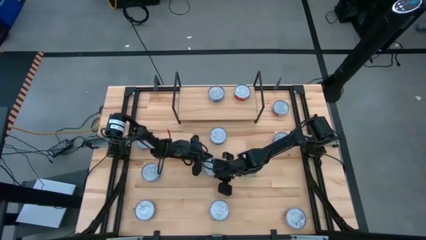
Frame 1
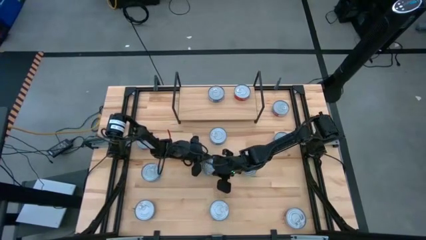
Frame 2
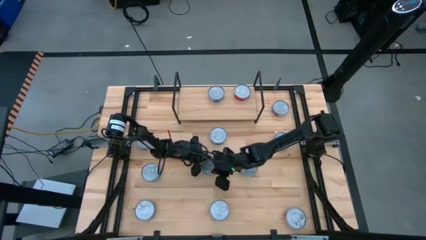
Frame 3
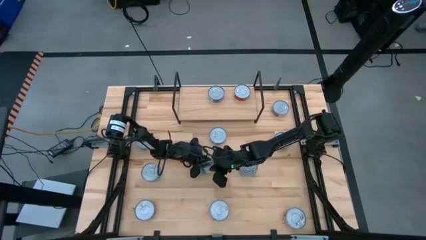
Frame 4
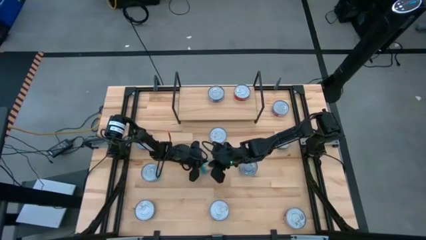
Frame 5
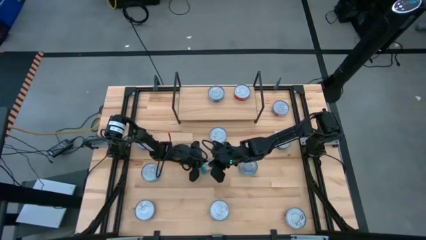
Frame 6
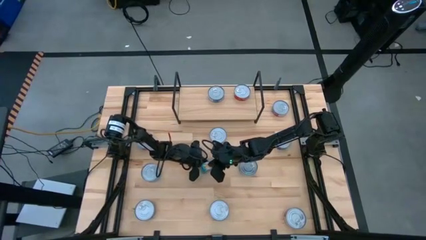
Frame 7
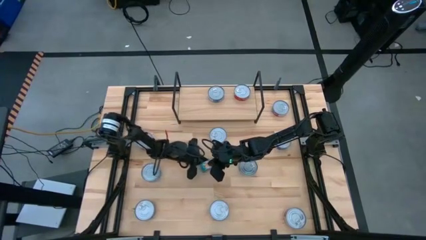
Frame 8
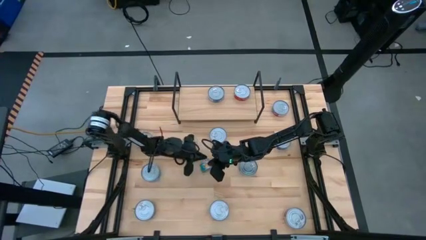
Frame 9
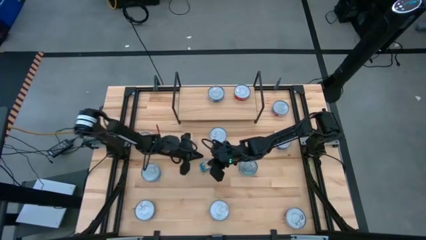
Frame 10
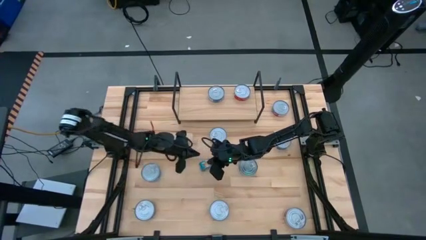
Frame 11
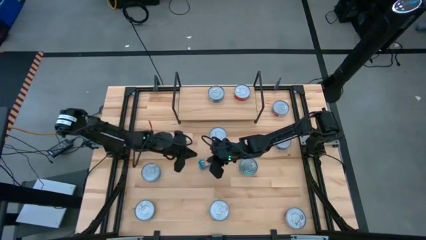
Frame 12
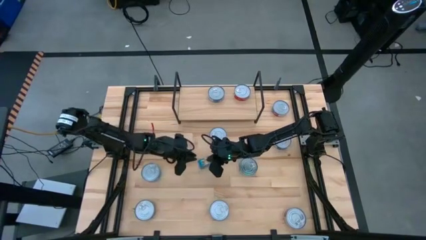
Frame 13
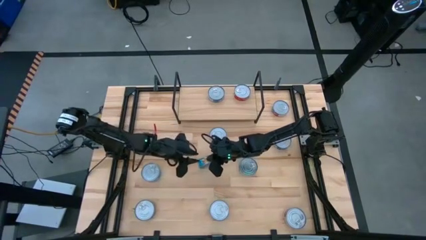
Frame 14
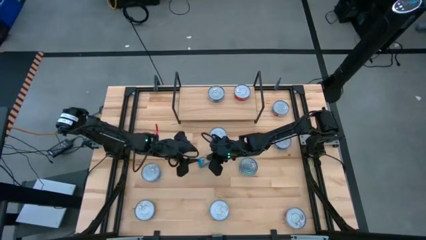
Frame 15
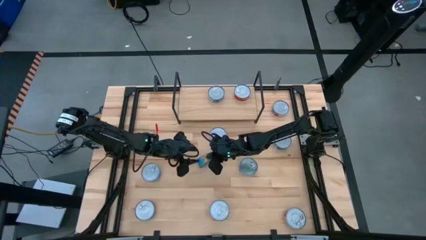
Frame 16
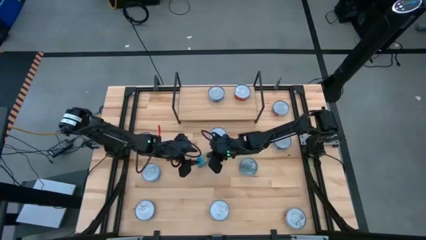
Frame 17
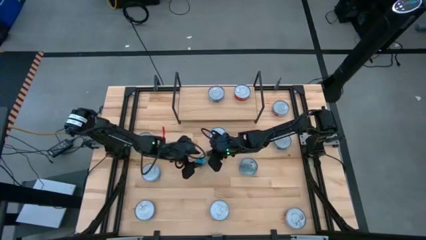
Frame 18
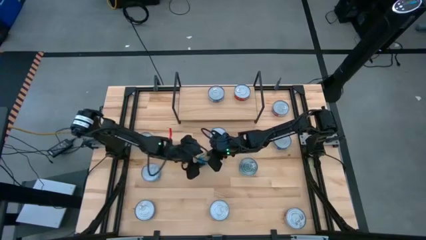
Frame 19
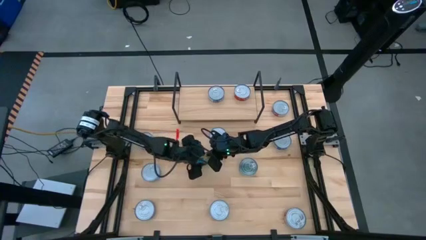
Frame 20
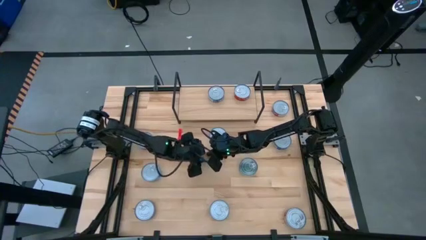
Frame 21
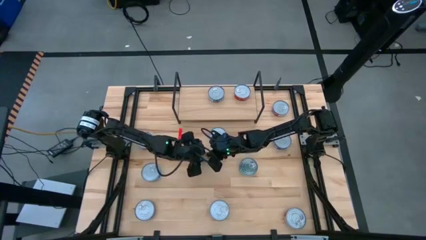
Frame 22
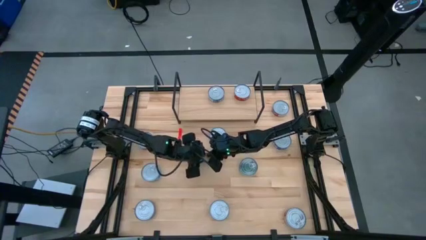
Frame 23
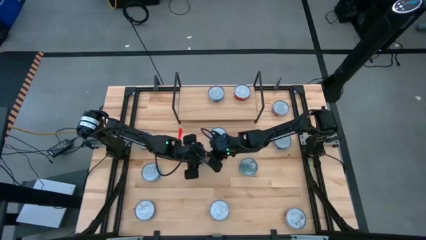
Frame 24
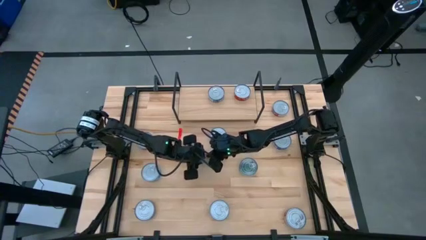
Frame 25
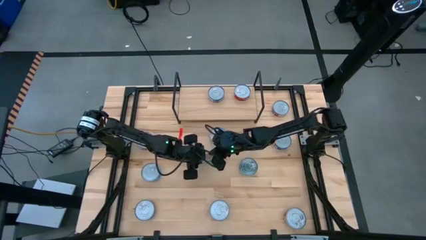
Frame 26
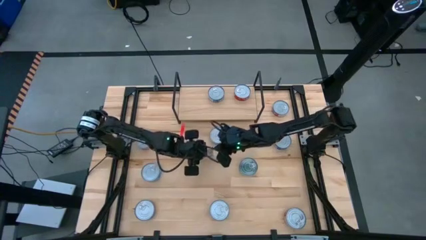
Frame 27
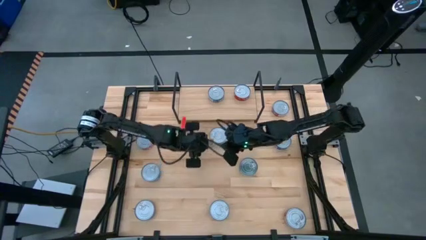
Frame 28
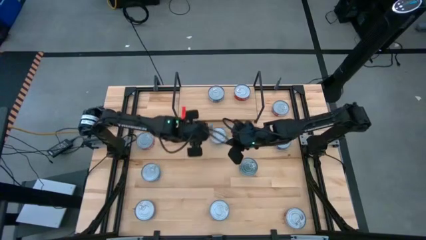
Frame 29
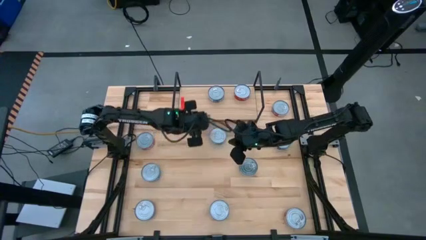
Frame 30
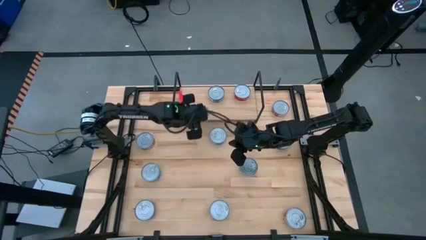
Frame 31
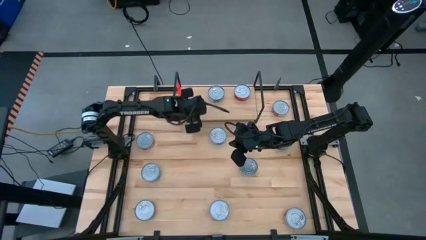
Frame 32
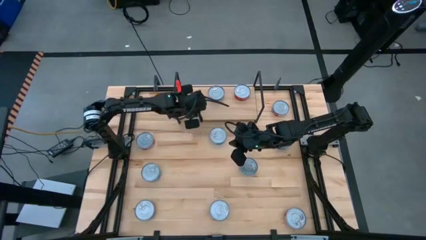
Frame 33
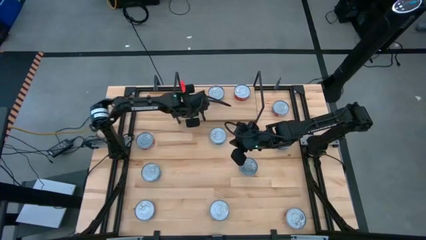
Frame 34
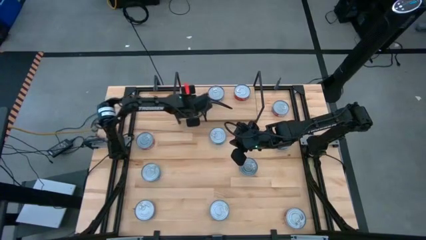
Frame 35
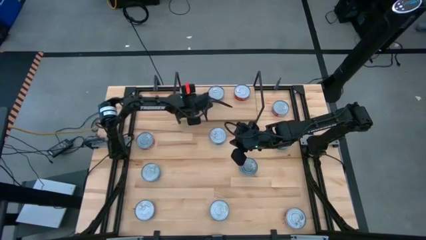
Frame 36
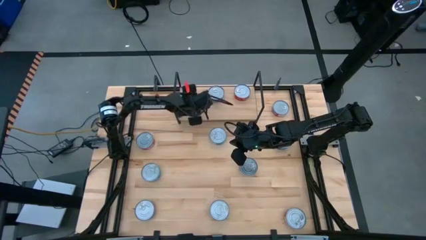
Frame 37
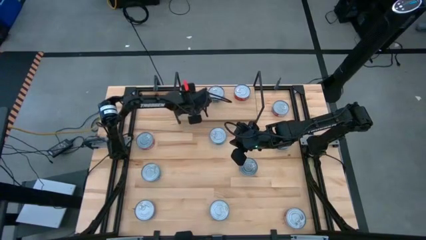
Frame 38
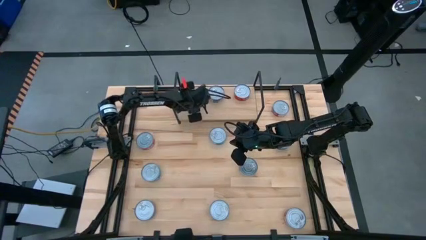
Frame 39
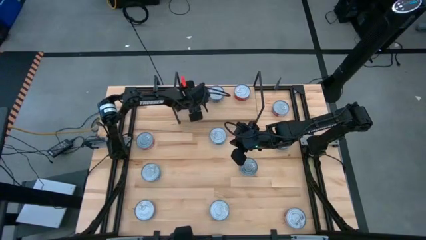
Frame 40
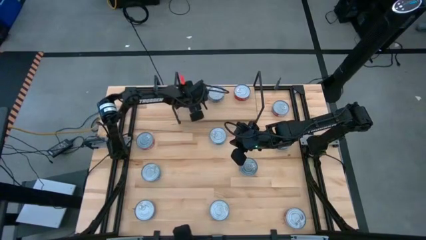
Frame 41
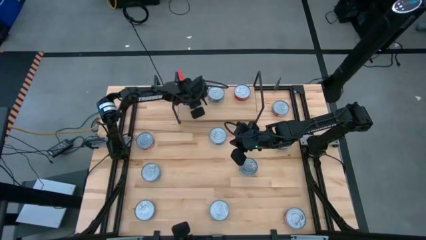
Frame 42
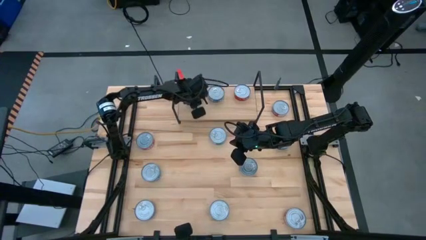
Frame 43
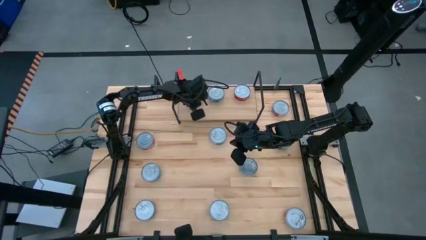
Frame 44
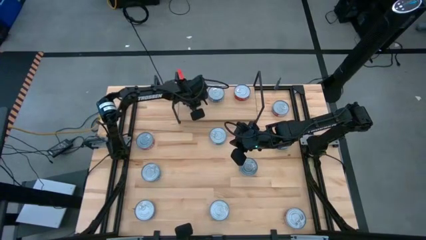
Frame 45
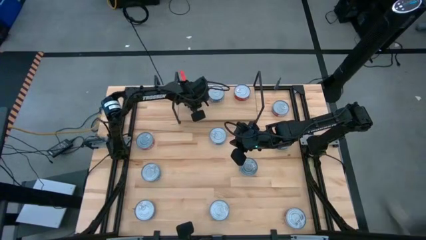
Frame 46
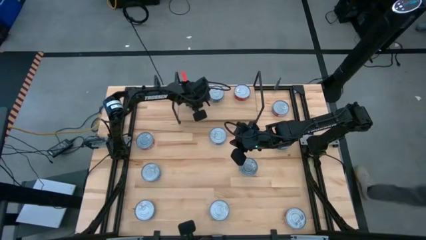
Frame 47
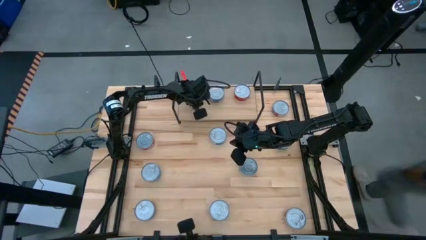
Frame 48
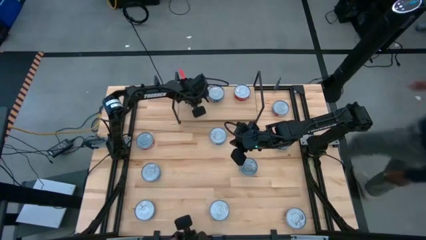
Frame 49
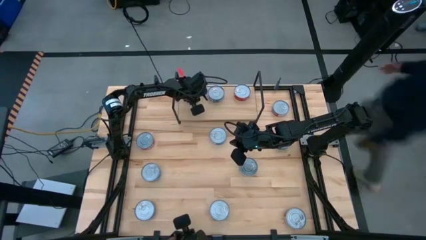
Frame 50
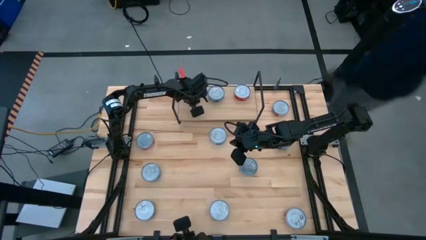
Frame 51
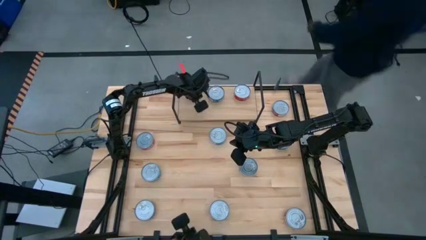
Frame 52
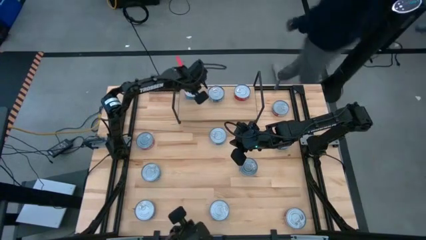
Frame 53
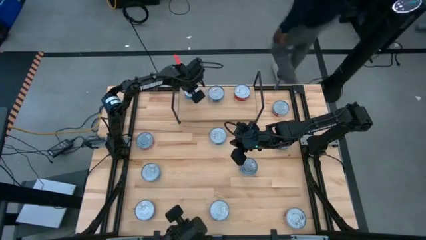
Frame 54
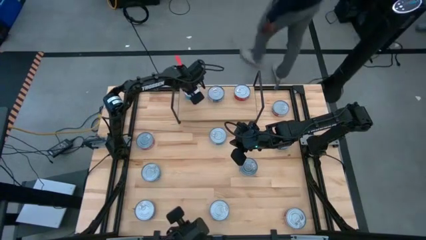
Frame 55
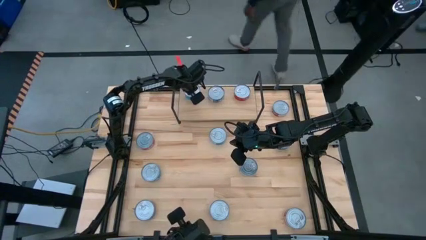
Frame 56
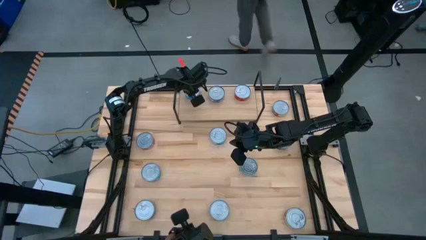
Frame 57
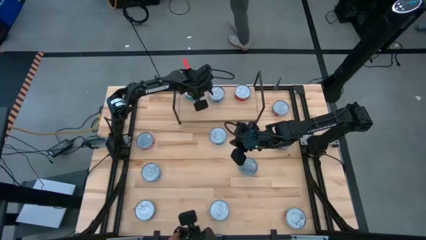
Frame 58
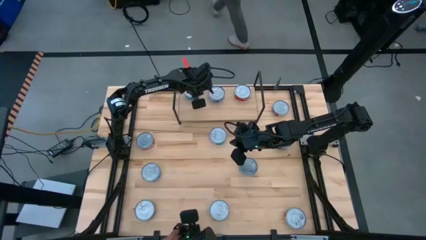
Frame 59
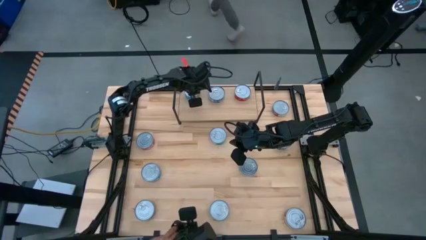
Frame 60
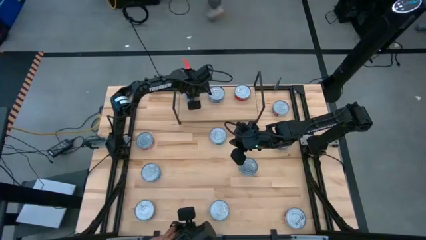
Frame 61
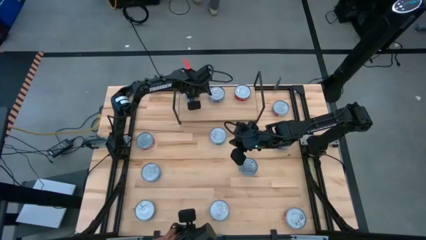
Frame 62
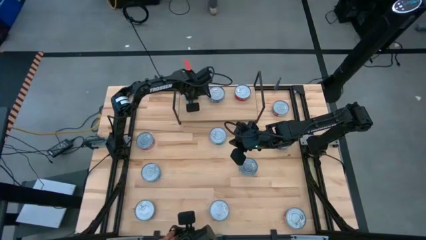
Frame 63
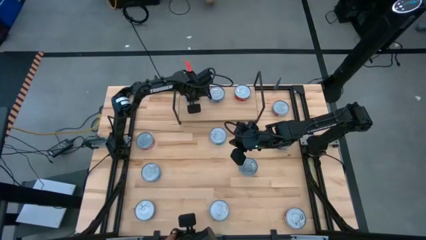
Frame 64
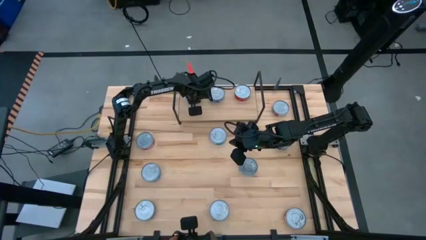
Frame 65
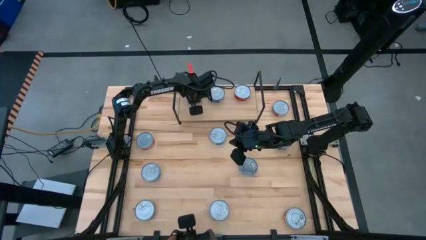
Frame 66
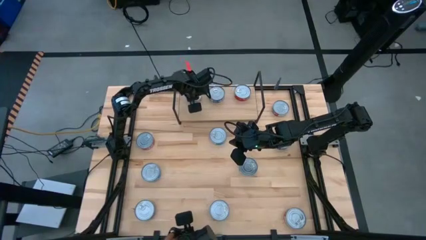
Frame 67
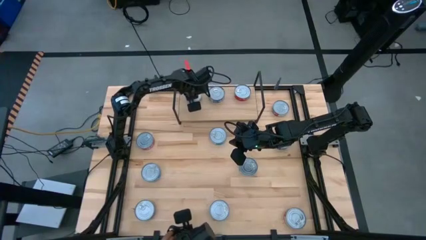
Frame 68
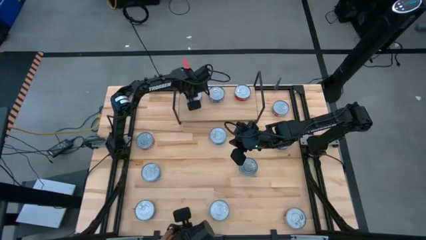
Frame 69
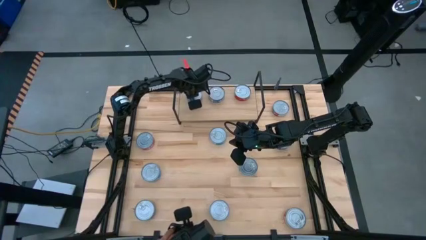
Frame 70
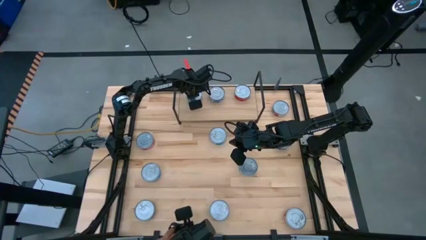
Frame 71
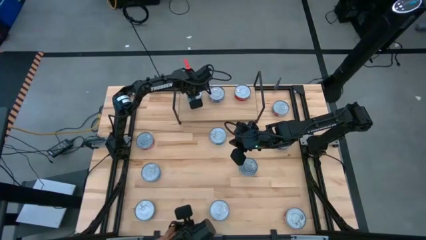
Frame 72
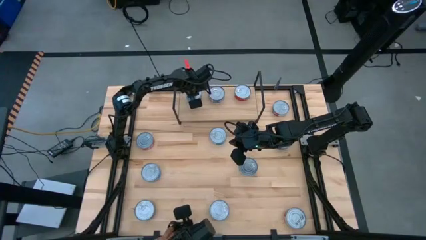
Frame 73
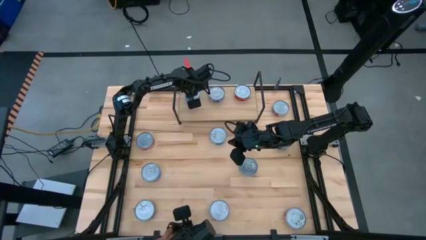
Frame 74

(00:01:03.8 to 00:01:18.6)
Task: Stack canned seafood by type on shelf
Put the center light blue tuna can on the shelf
